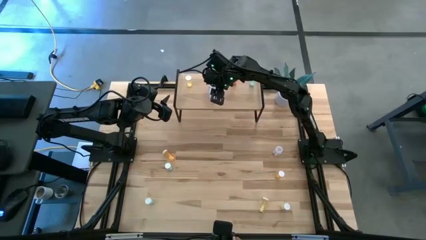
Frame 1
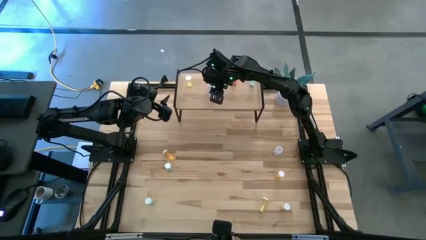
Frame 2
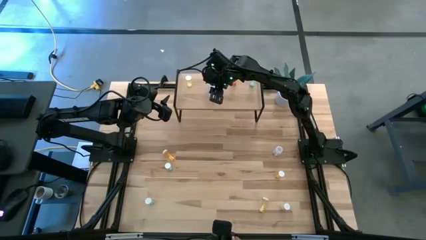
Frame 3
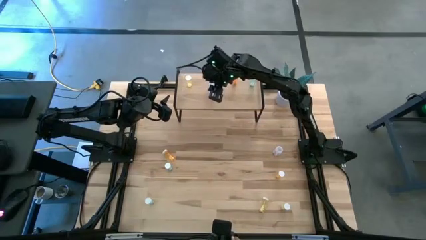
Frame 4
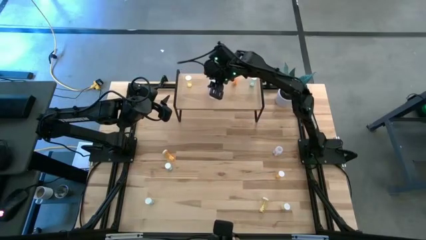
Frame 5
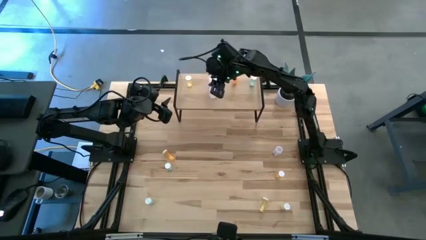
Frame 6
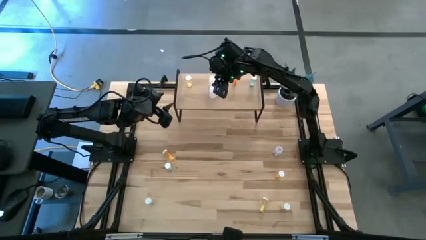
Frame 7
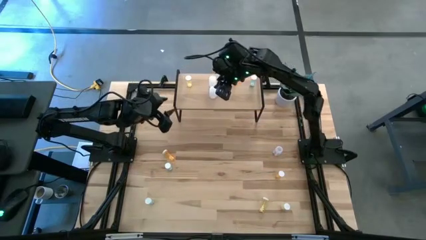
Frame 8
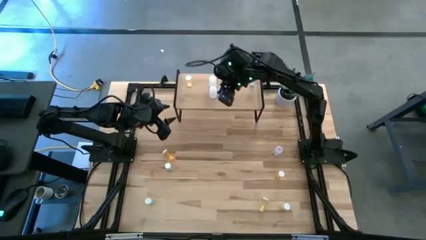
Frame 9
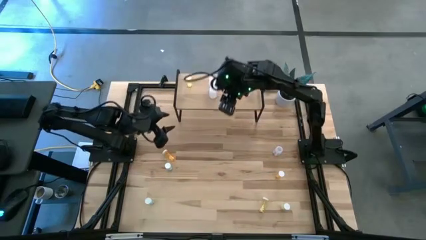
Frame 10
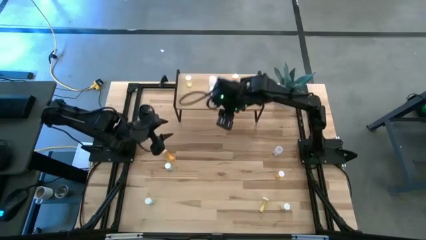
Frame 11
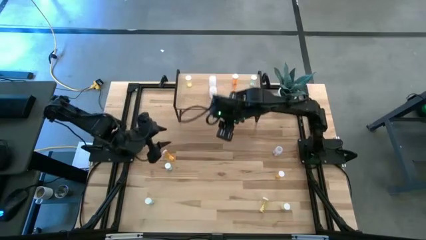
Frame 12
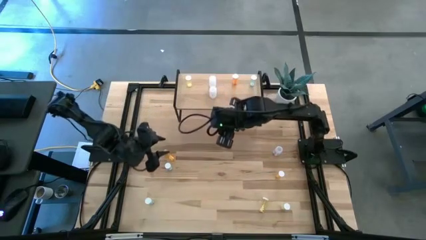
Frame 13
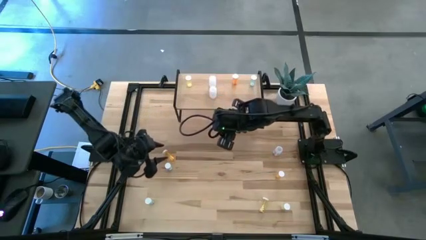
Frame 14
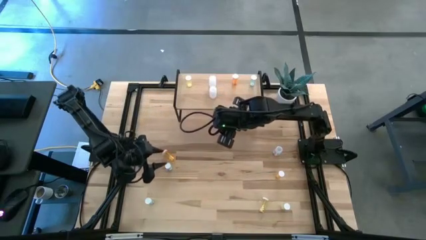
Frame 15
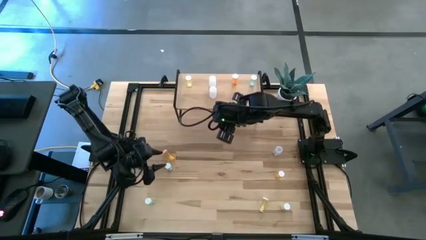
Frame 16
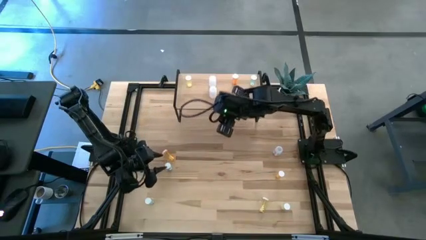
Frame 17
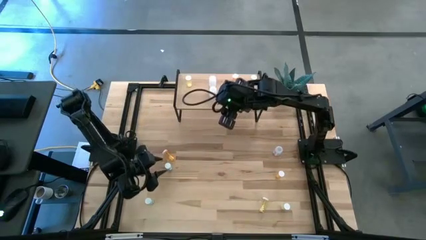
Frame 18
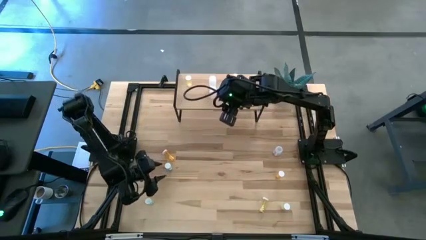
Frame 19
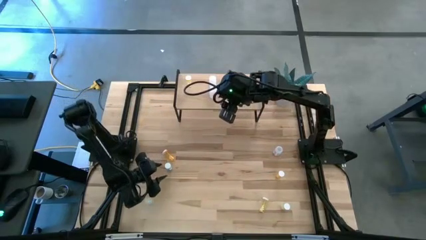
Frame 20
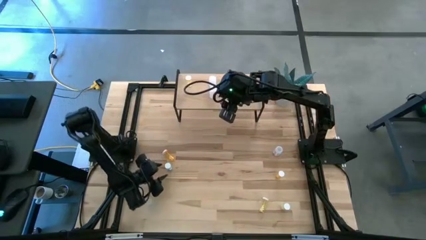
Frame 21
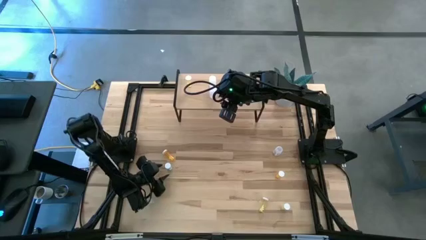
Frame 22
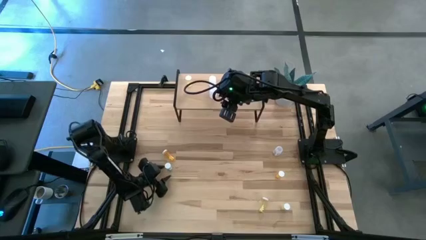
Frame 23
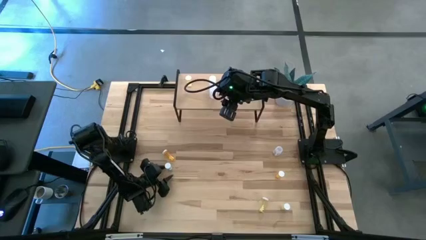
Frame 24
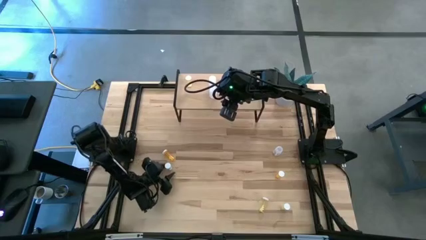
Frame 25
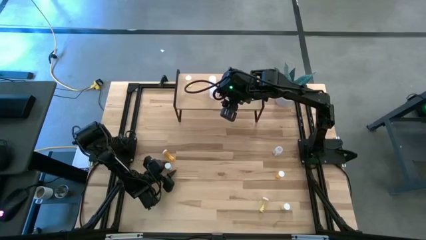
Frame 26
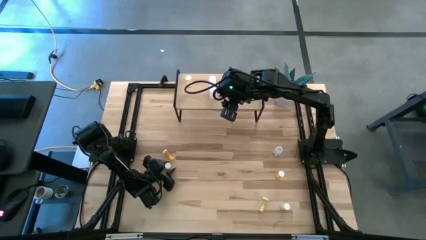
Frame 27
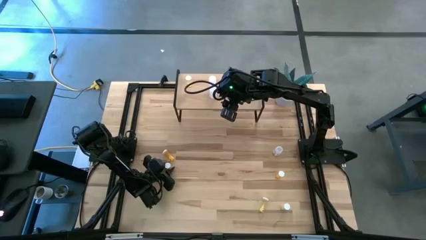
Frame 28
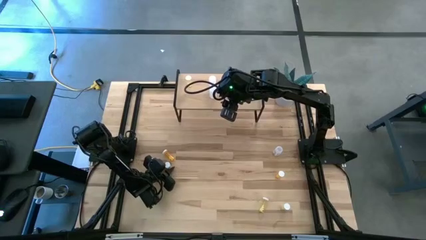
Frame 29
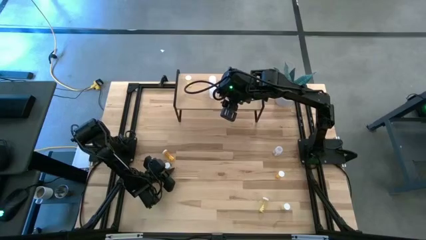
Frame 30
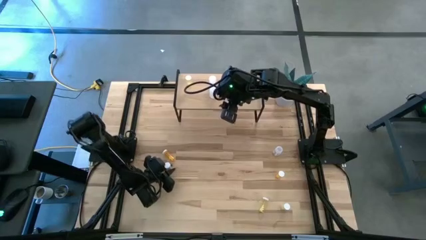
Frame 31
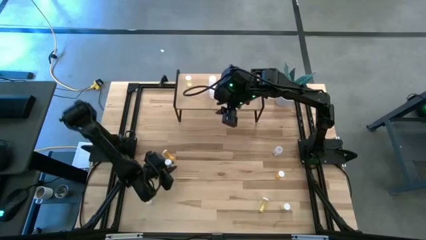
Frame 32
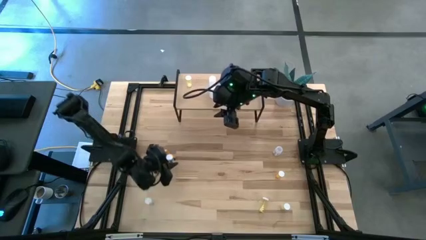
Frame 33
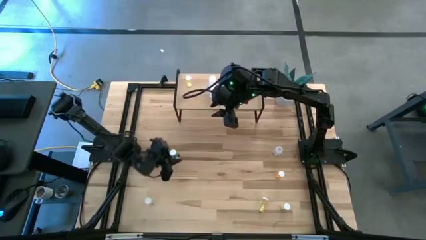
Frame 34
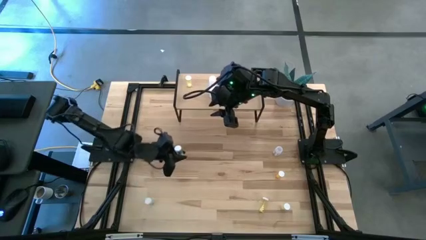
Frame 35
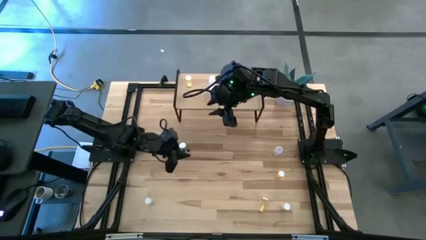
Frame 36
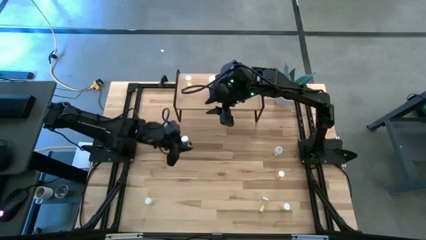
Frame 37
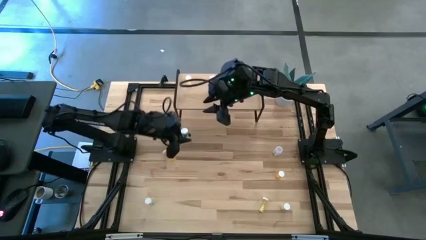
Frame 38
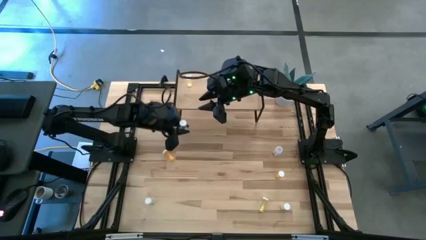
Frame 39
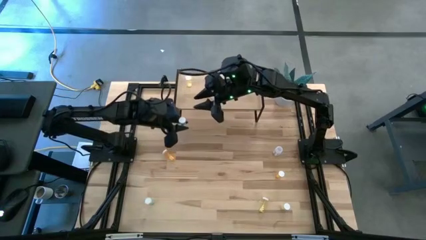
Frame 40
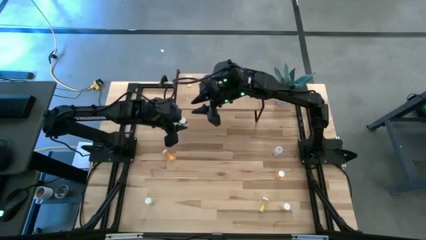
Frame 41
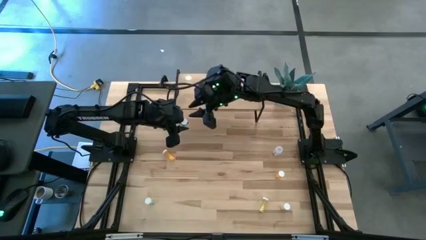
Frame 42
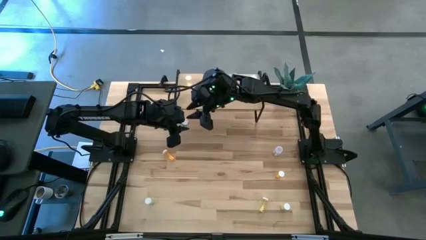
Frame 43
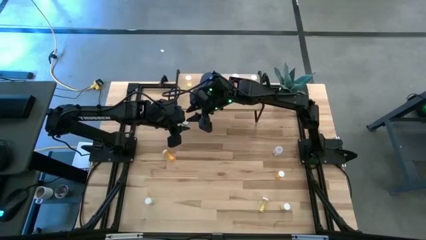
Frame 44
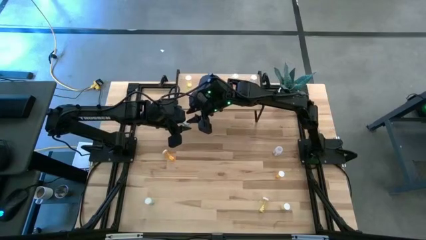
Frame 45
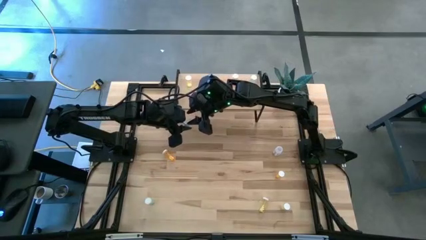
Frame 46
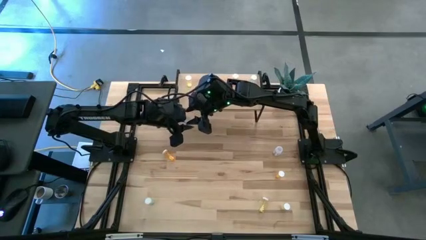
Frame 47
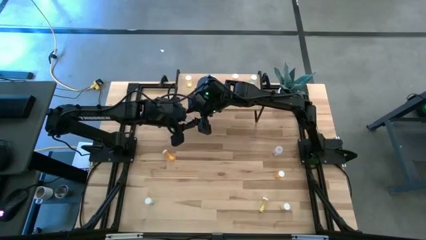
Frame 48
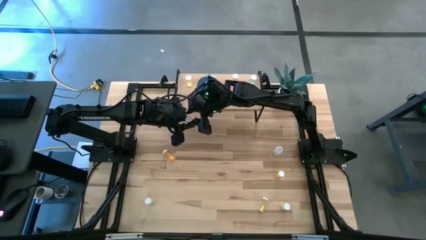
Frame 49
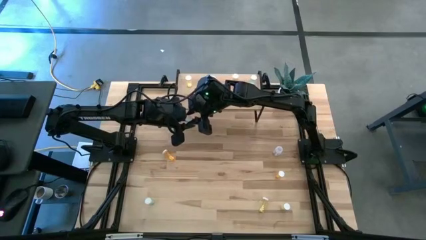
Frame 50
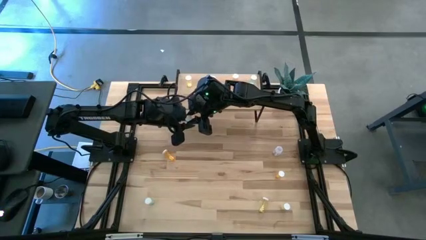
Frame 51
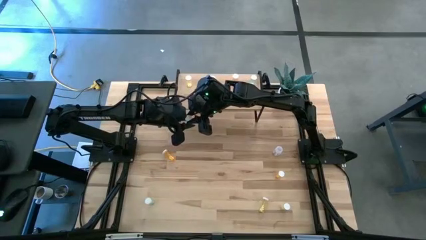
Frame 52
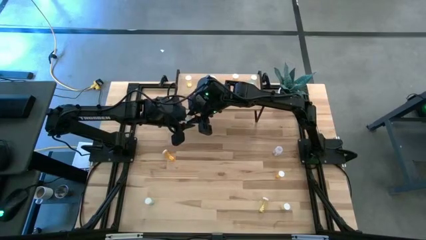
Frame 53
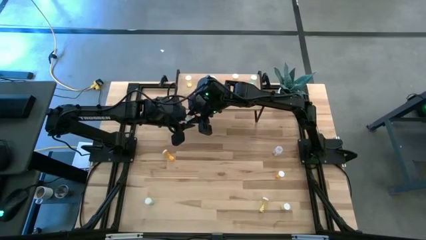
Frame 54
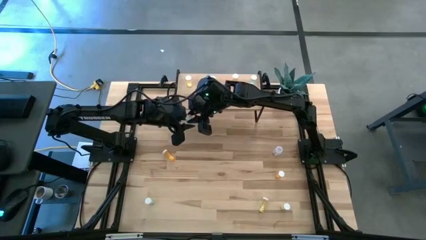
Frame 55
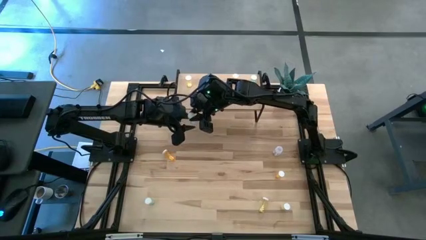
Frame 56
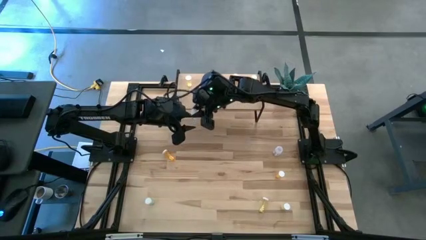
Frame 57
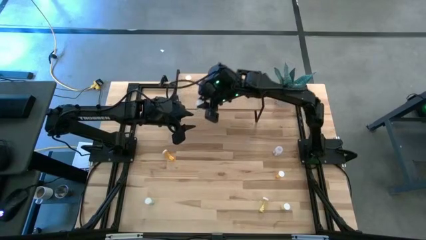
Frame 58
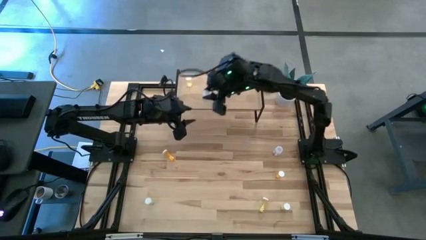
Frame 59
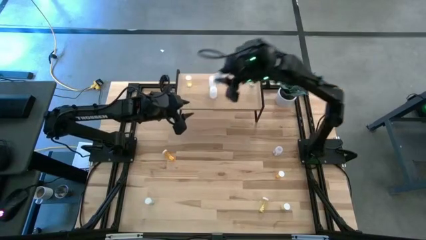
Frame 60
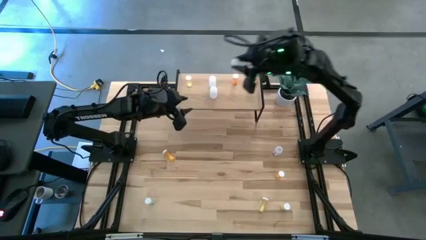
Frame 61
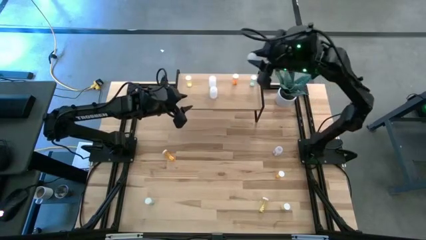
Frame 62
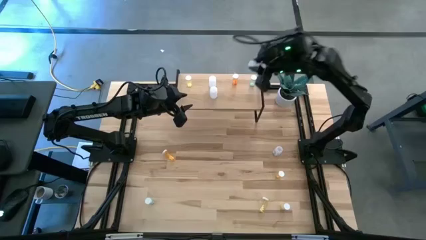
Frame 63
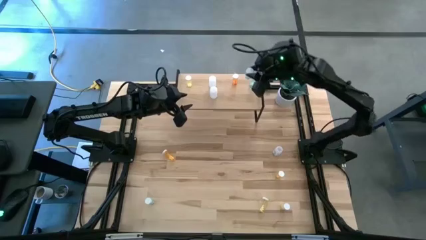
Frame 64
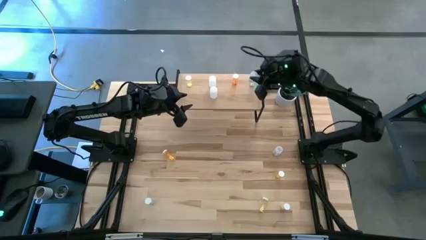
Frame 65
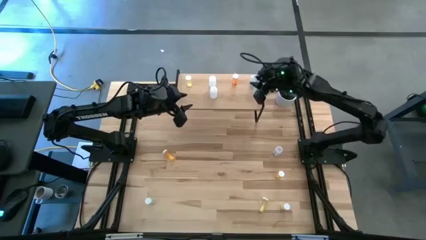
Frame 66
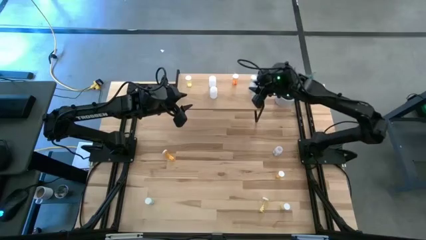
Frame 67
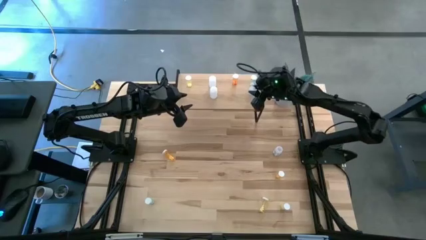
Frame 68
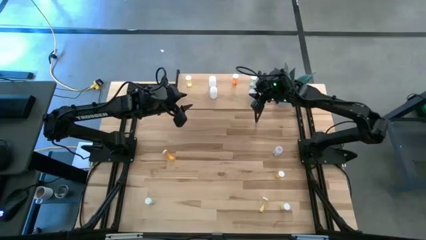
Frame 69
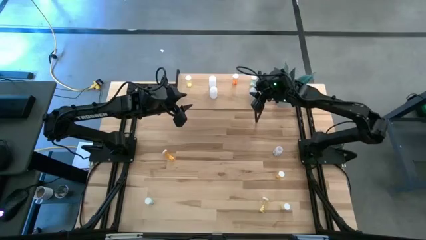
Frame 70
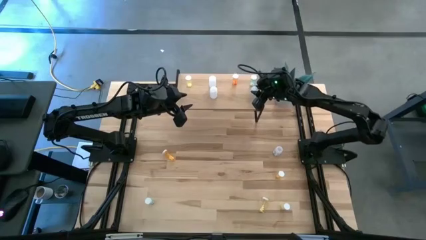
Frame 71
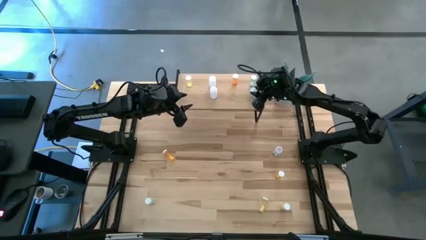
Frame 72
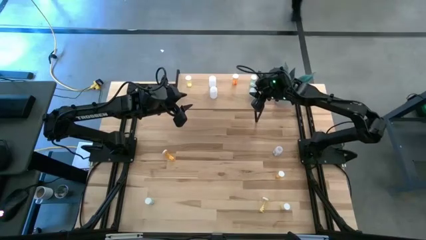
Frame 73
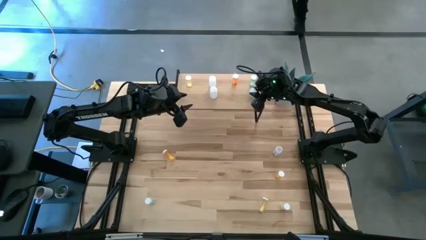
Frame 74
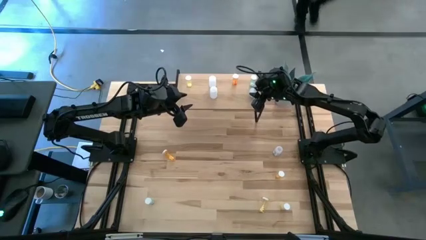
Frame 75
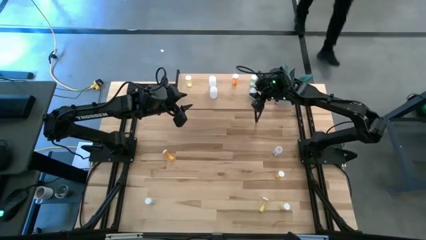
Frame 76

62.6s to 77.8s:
Task: Pick and place medicine bottles onto shelf by color
Put the top blue medicine bottle on the shelf aligned with the other blue medicine bottle

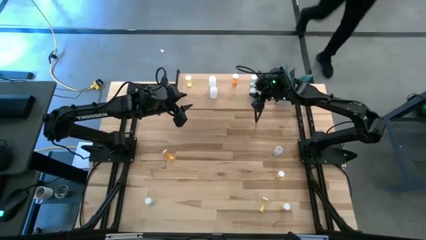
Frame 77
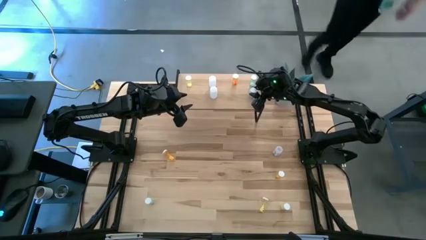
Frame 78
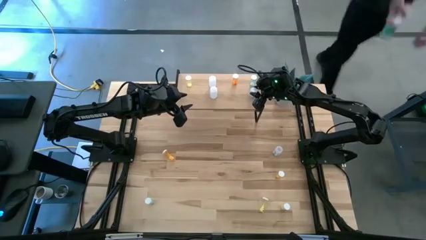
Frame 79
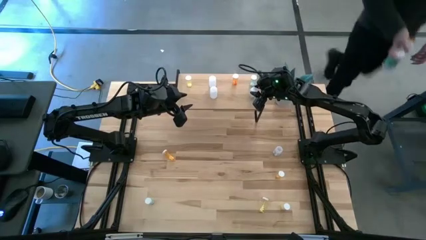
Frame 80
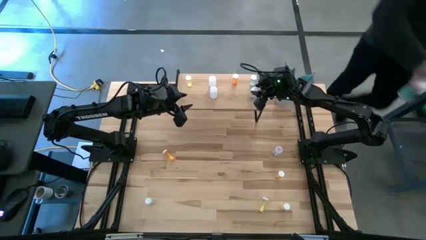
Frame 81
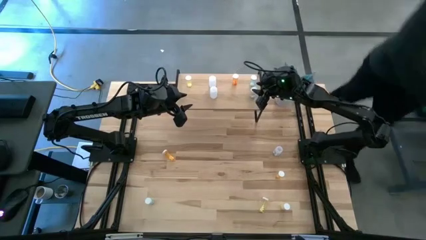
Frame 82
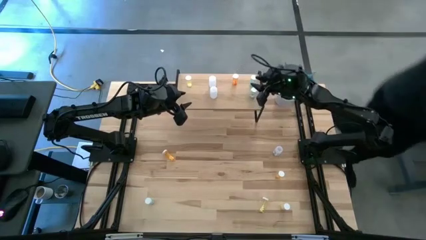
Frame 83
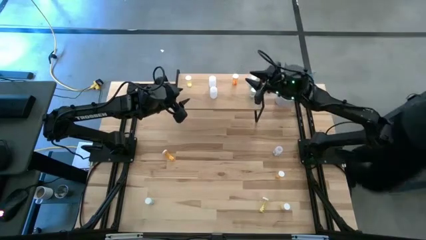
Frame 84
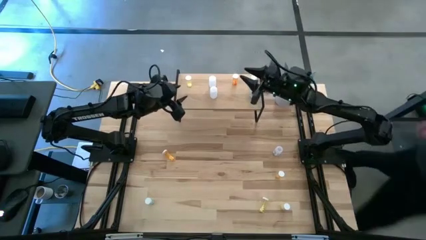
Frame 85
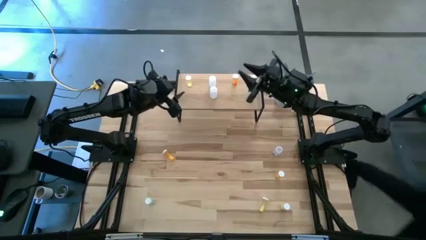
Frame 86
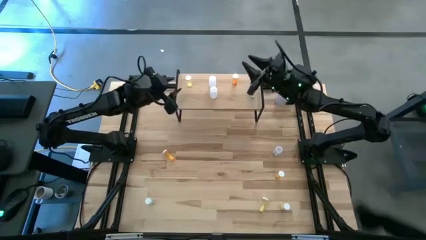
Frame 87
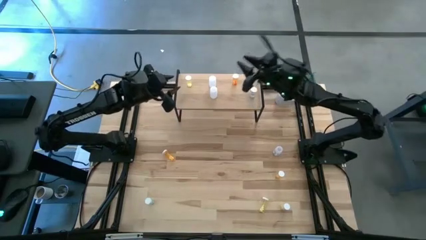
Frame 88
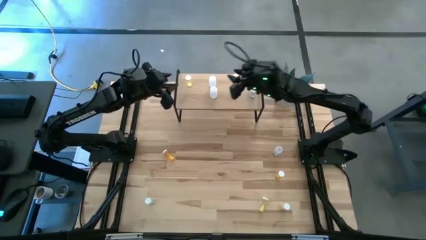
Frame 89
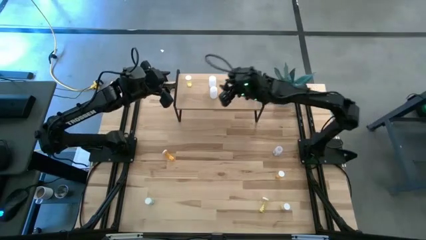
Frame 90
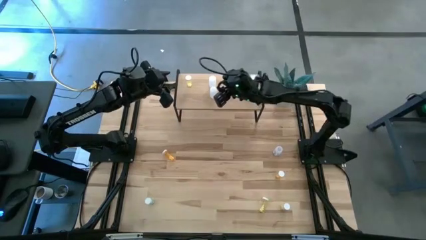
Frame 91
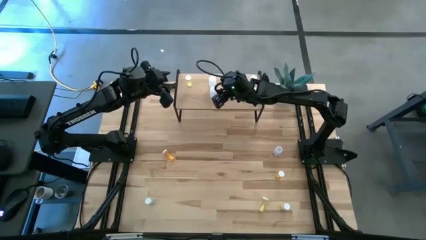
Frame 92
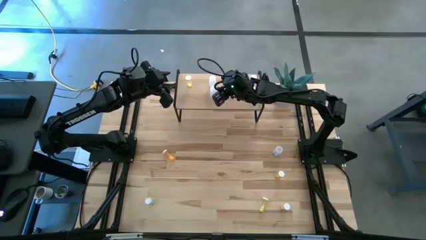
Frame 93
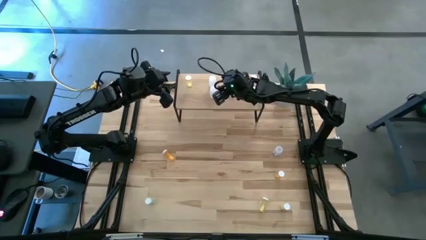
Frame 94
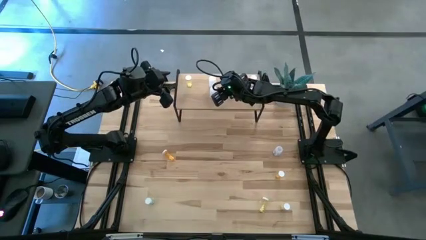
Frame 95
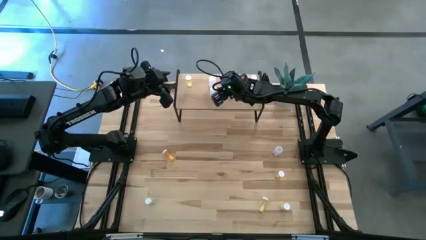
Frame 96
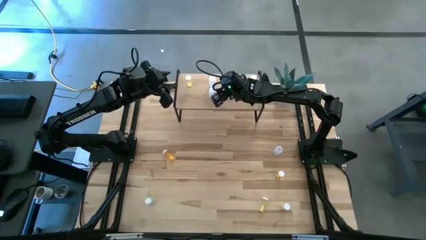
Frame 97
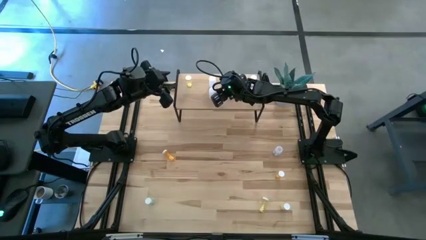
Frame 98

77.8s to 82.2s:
Adjust the white medicine bottle on the shelf
